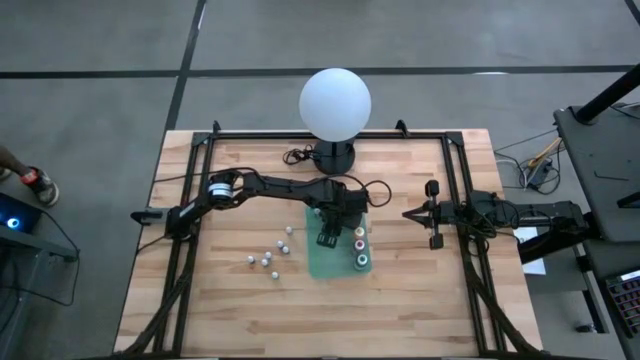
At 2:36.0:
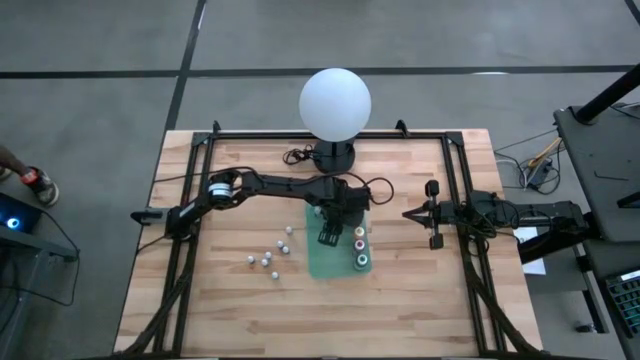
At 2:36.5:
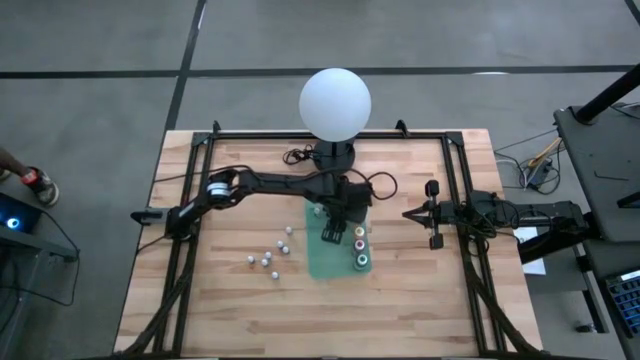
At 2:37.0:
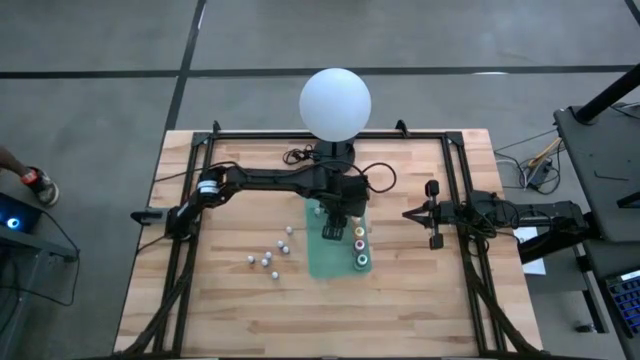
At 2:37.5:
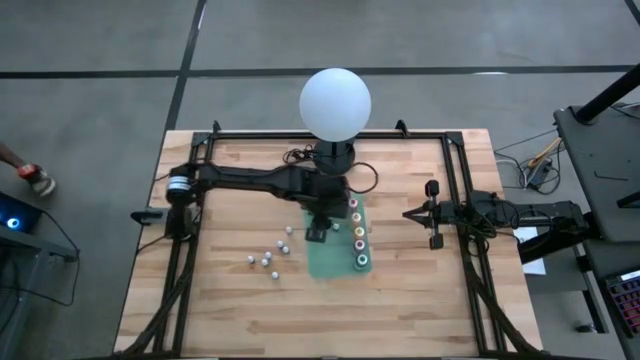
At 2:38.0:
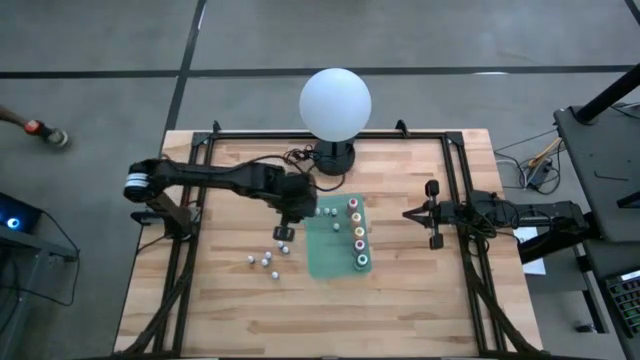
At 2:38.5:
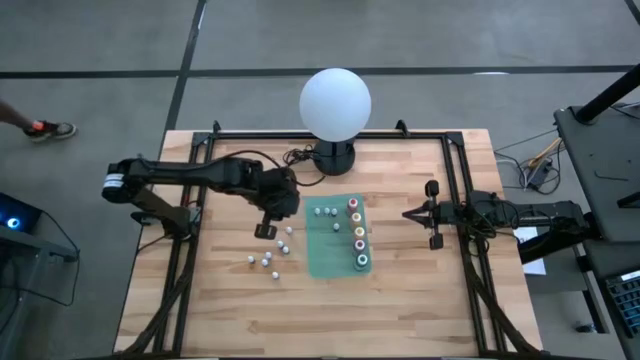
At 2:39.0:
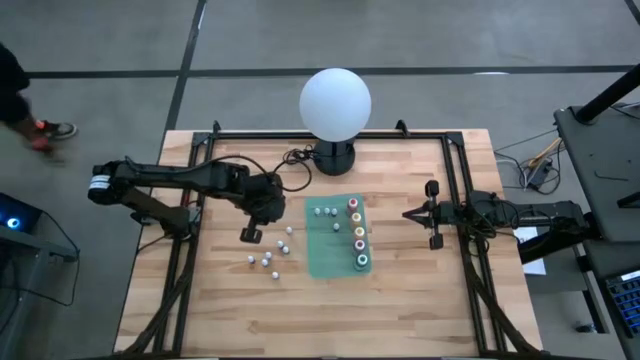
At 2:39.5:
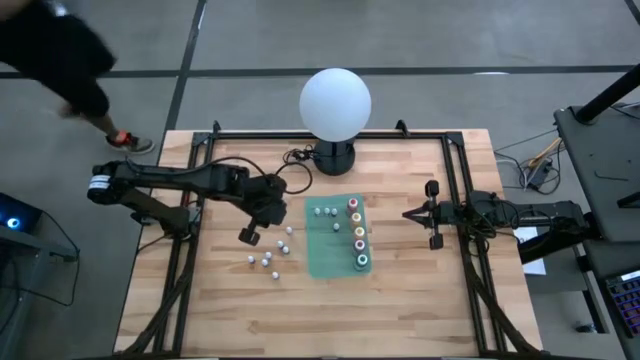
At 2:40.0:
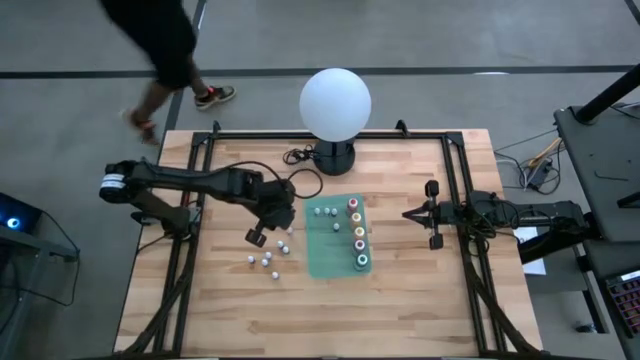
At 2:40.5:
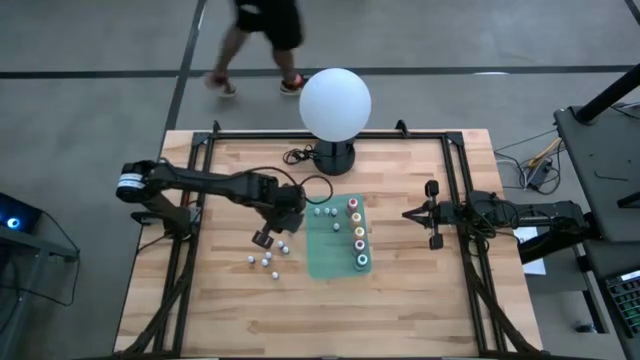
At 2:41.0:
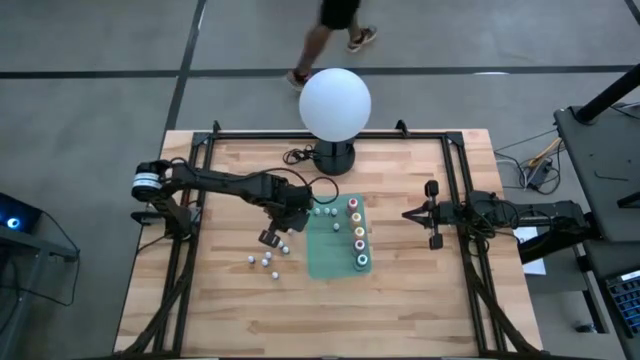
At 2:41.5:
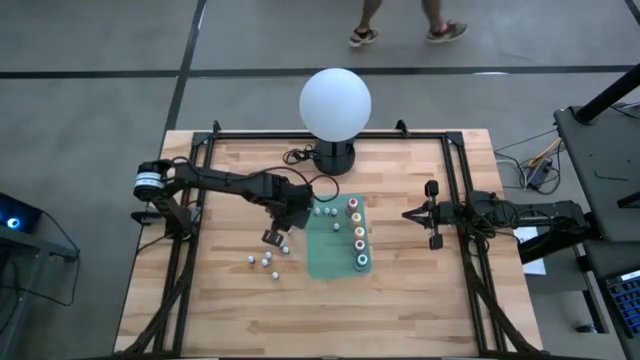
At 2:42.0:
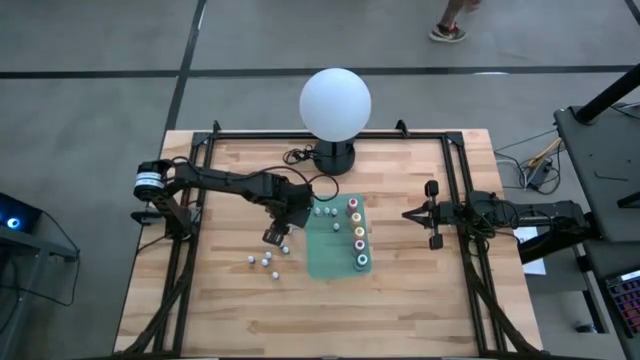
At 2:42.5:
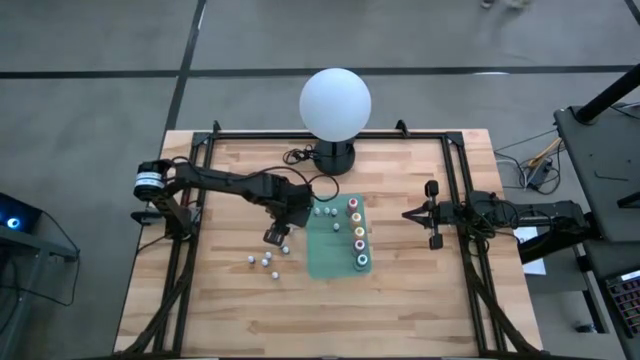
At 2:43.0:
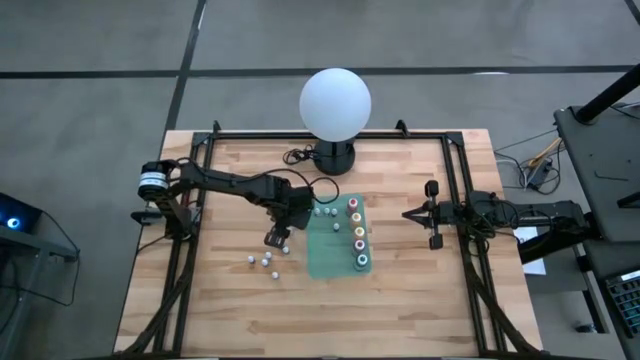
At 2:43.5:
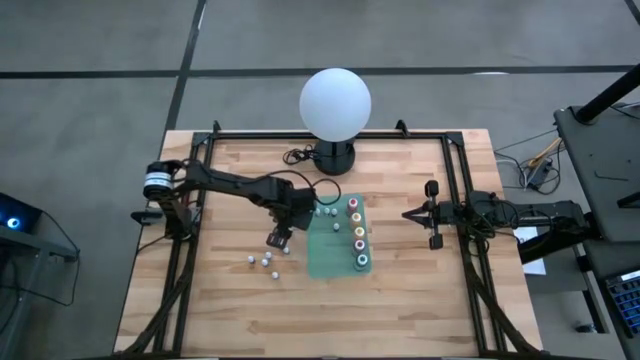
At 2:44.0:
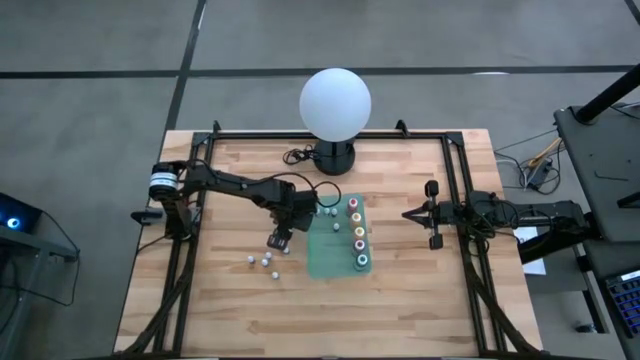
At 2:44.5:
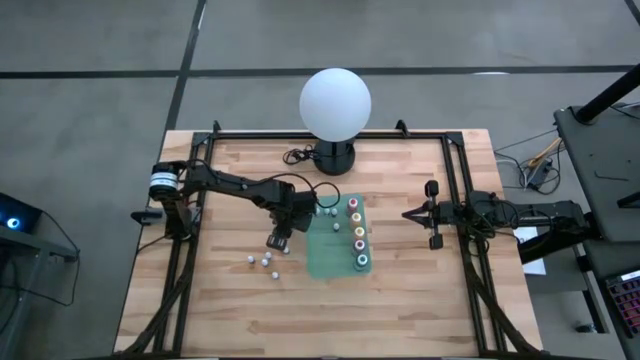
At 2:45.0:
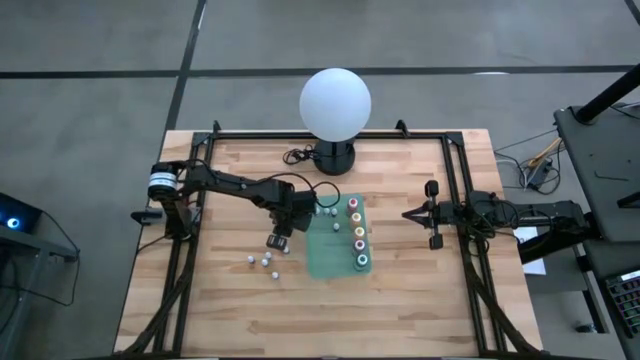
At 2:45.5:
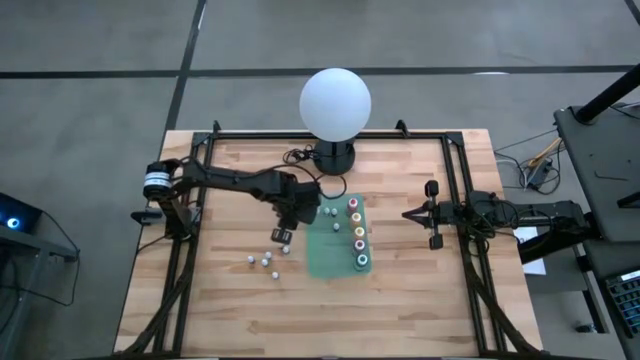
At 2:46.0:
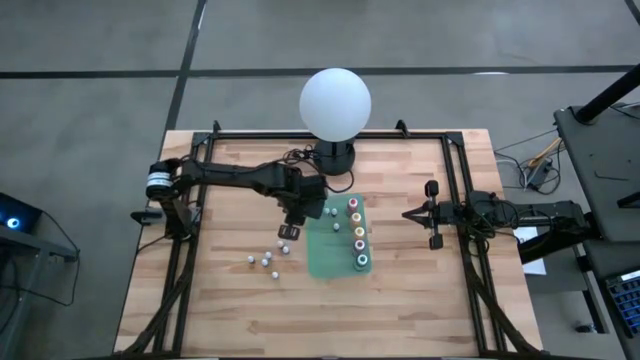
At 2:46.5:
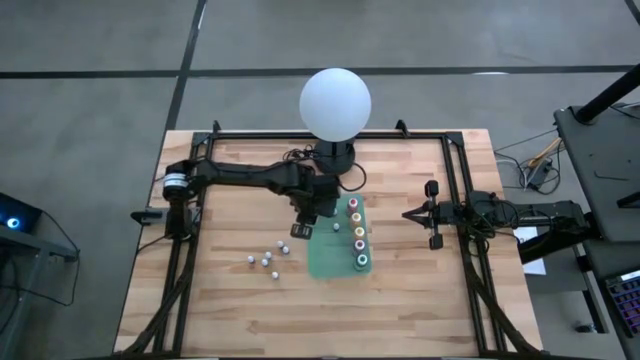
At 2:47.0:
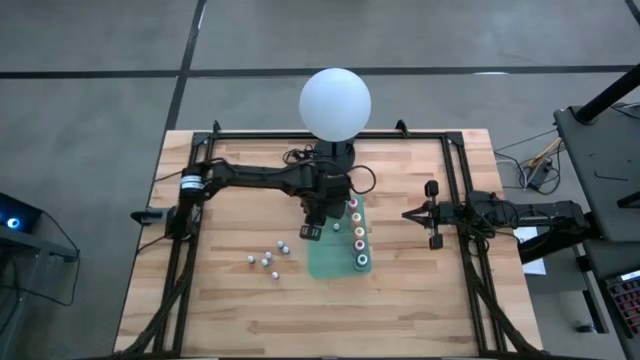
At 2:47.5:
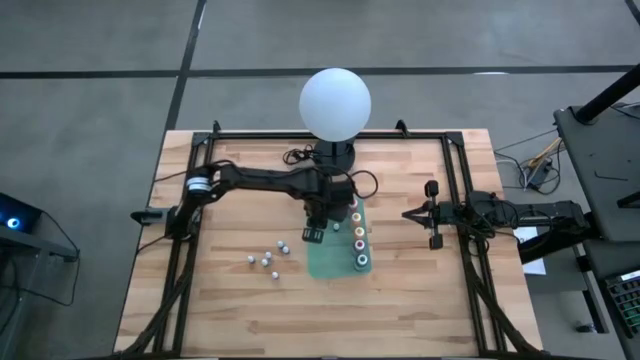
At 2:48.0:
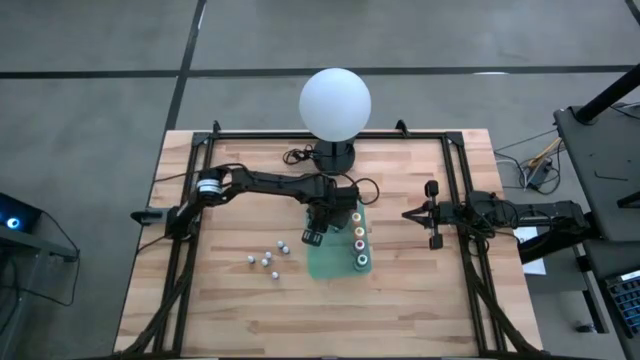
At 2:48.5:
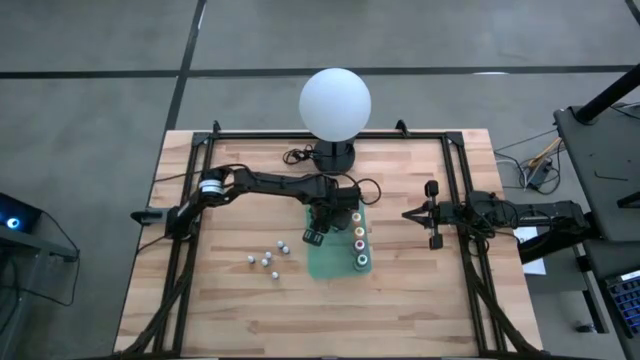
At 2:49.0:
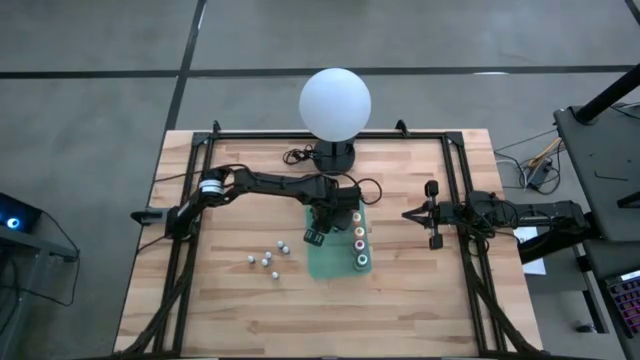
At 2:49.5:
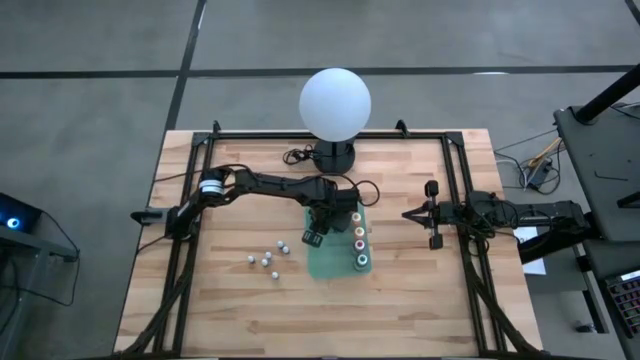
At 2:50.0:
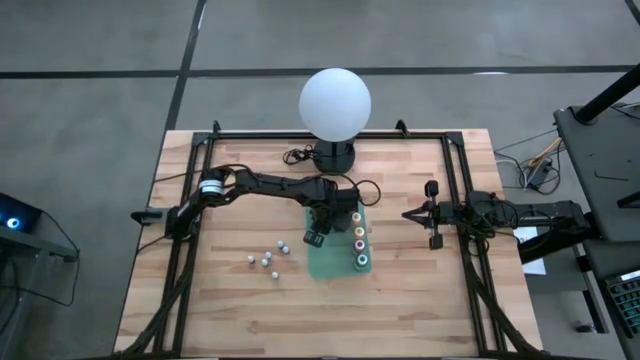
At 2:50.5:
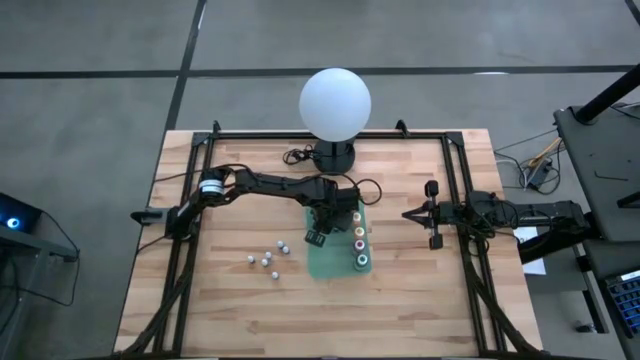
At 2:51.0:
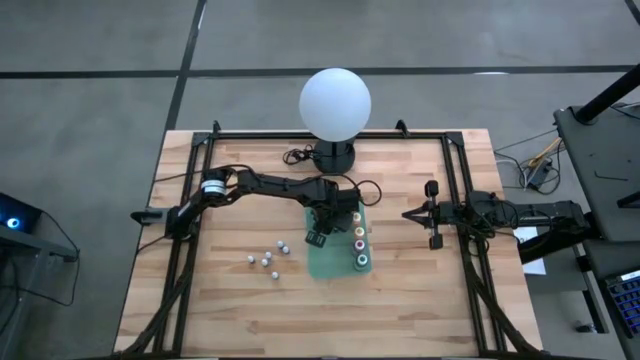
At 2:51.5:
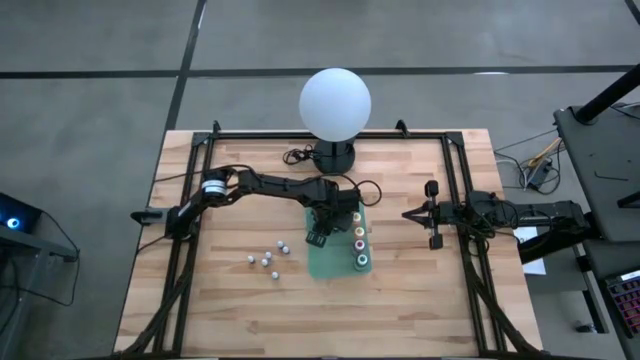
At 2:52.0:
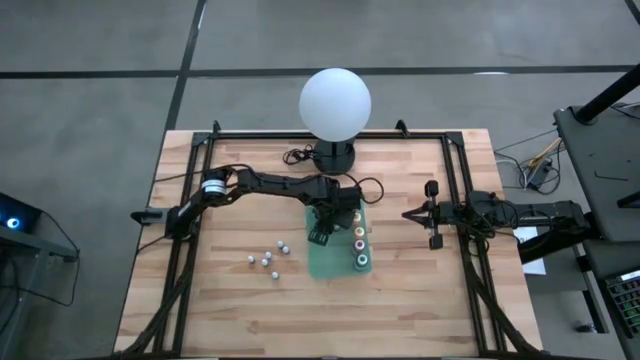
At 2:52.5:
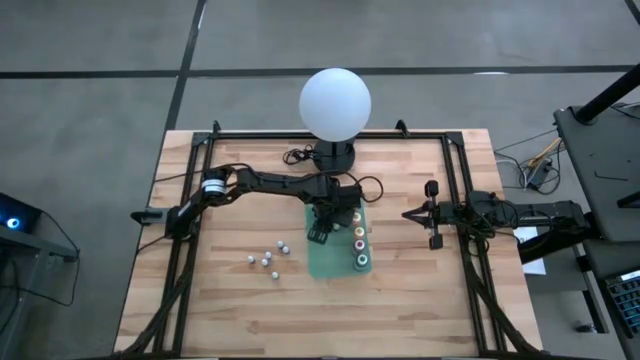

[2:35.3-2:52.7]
Task: Pick & Place food coloring
Put the small red food coloring bottle into the green bin

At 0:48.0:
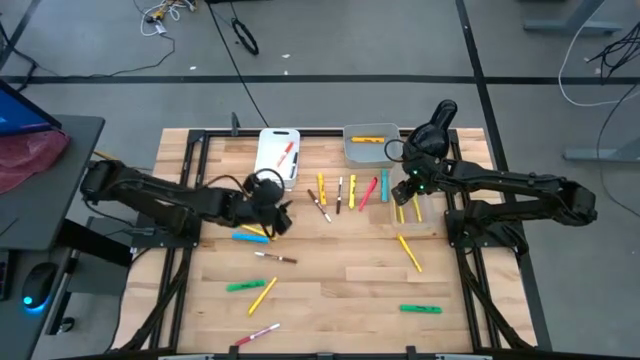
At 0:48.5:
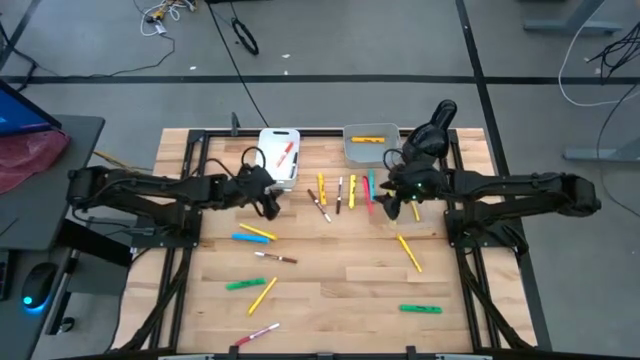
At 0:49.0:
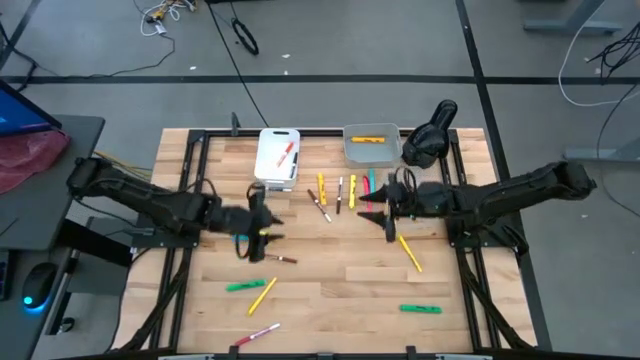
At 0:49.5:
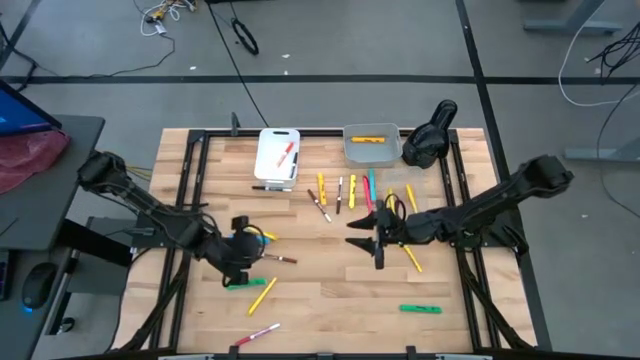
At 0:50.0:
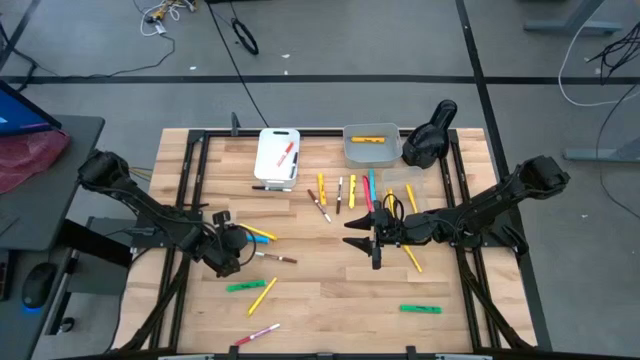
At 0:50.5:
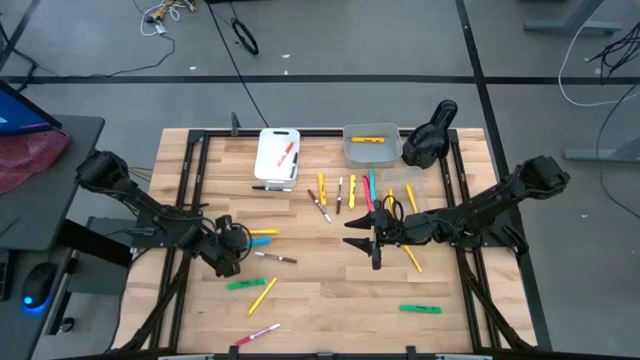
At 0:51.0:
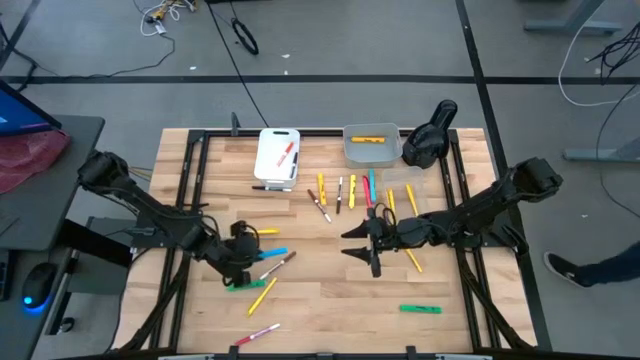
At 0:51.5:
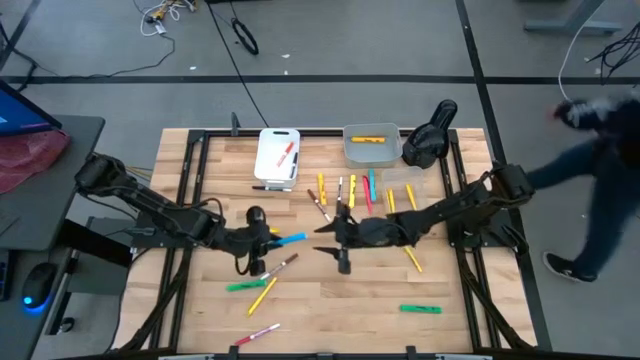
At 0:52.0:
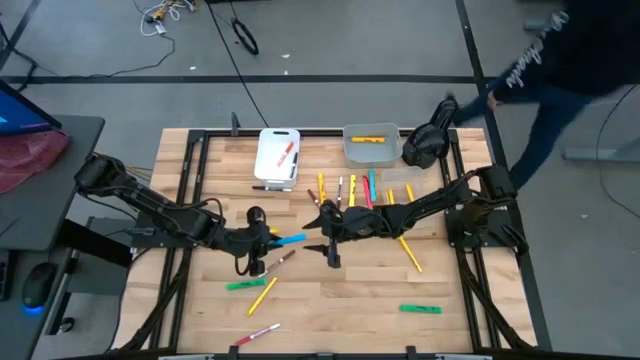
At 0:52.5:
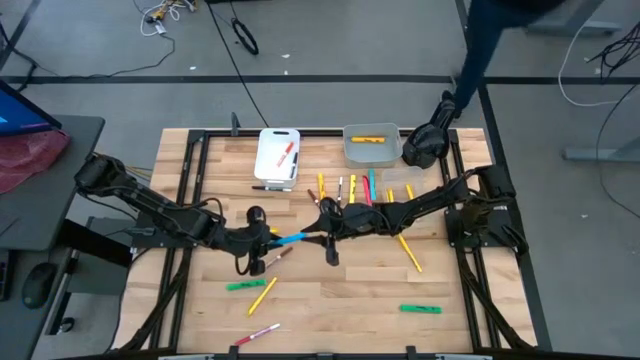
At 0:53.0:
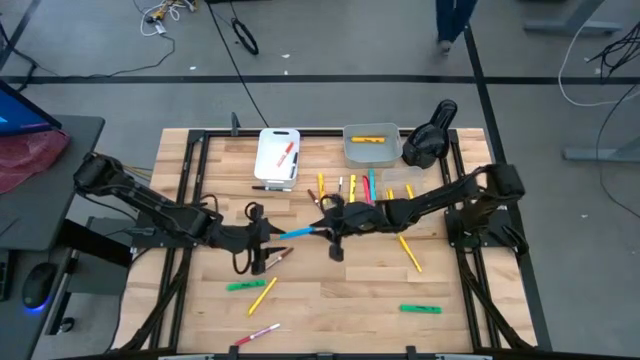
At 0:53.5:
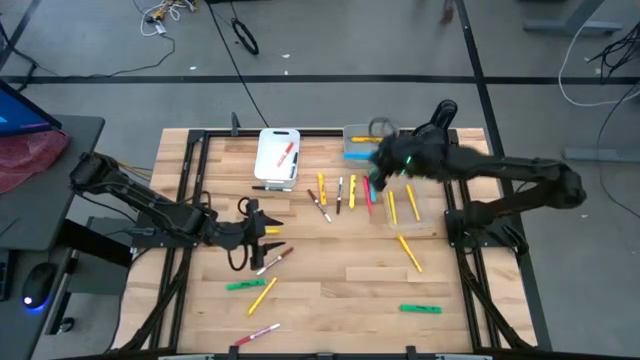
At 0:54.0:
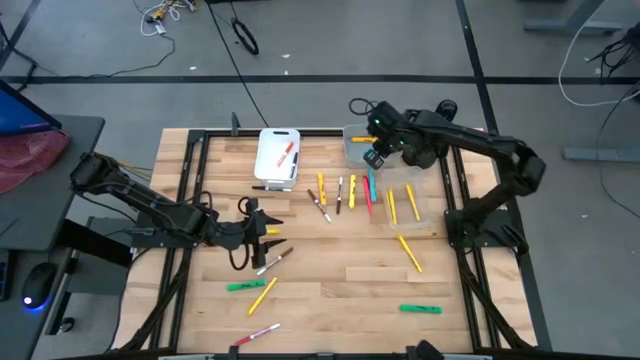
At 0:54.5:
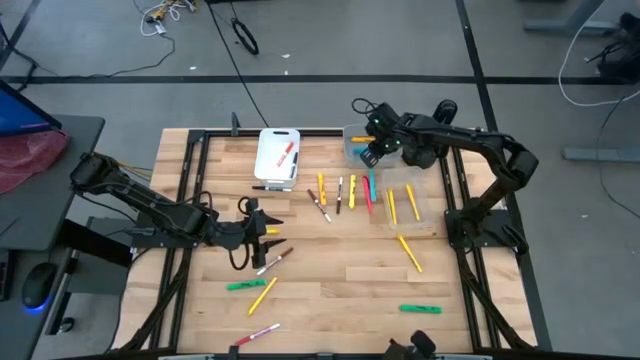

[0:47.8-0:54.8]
Task: Pick & Place Markers
Put the blue highlighter pen into the gray bin
